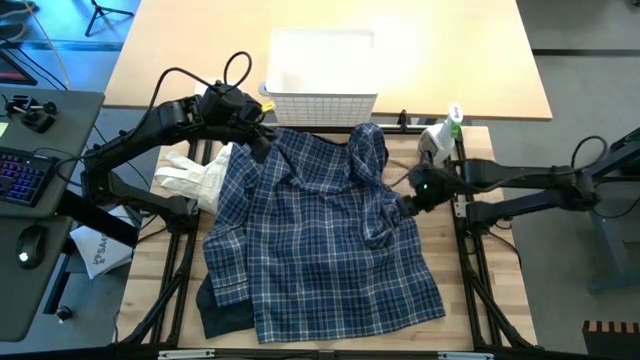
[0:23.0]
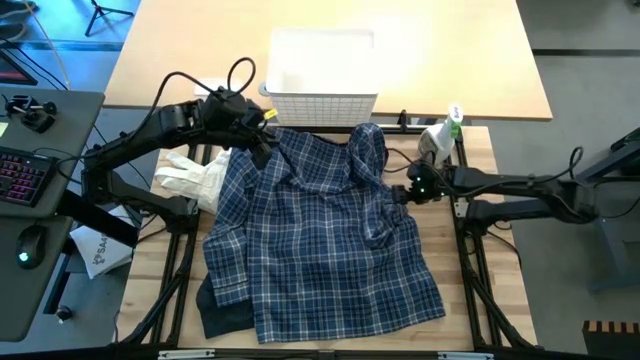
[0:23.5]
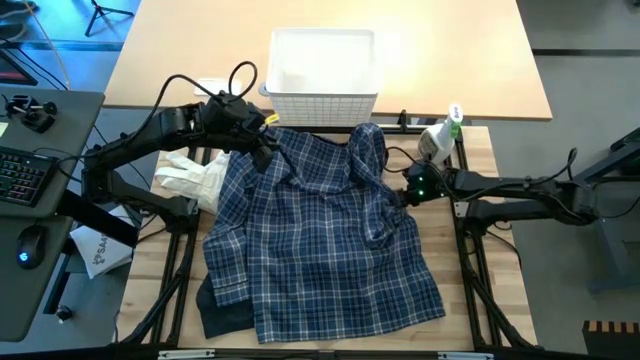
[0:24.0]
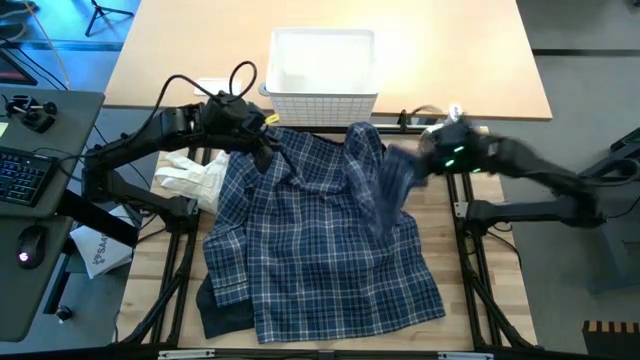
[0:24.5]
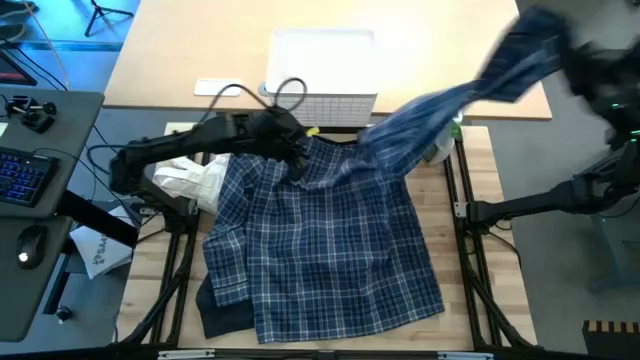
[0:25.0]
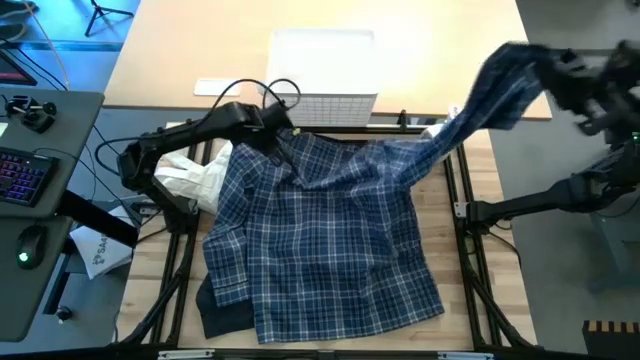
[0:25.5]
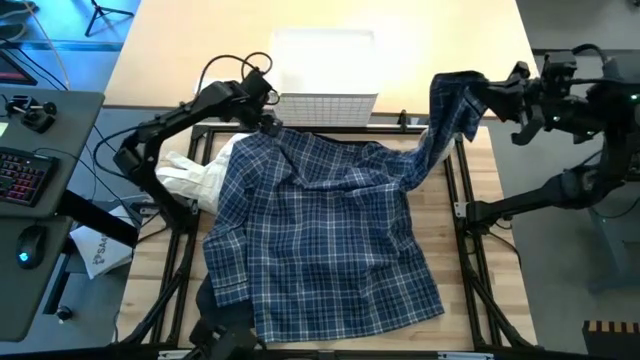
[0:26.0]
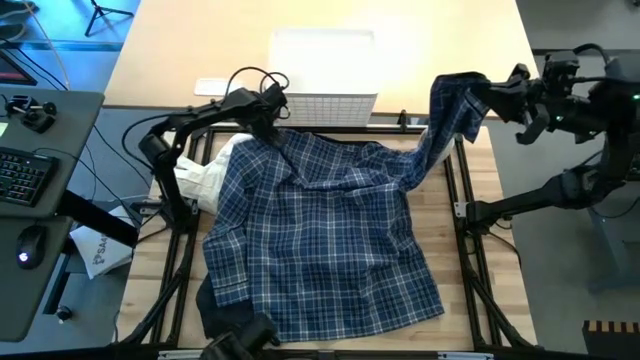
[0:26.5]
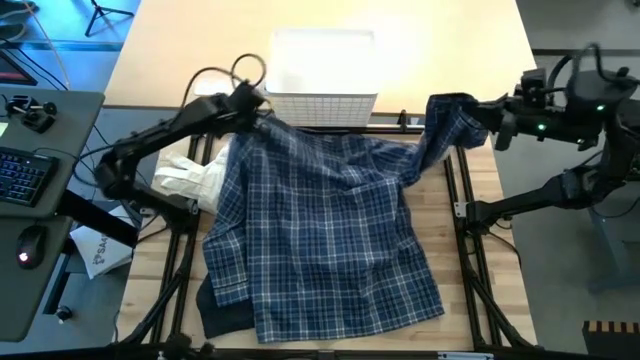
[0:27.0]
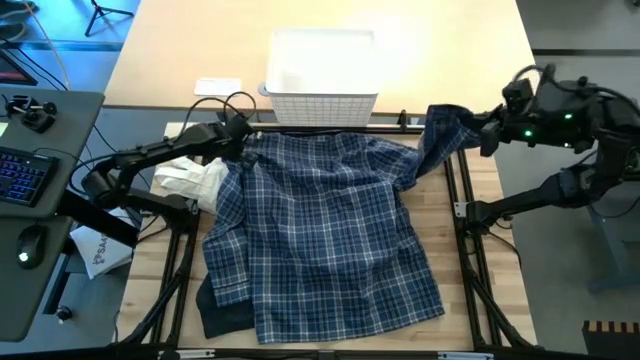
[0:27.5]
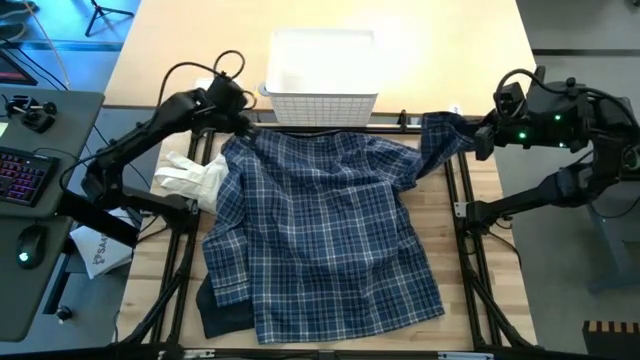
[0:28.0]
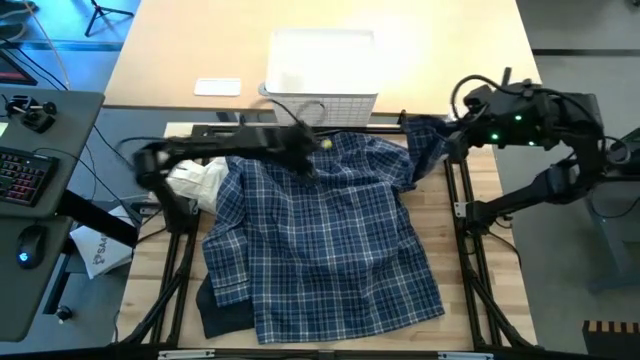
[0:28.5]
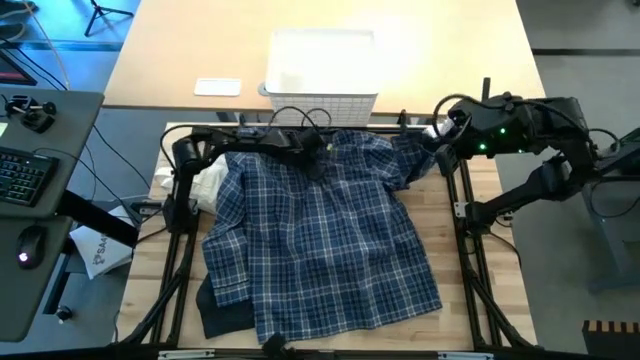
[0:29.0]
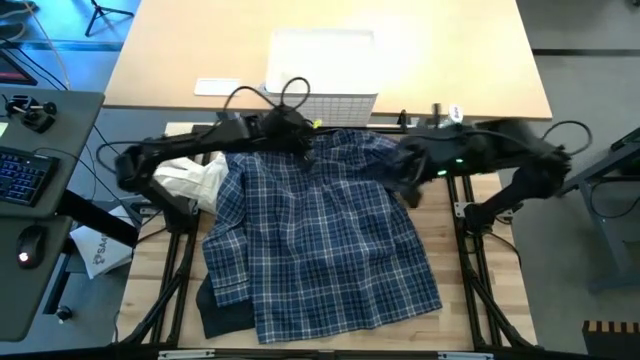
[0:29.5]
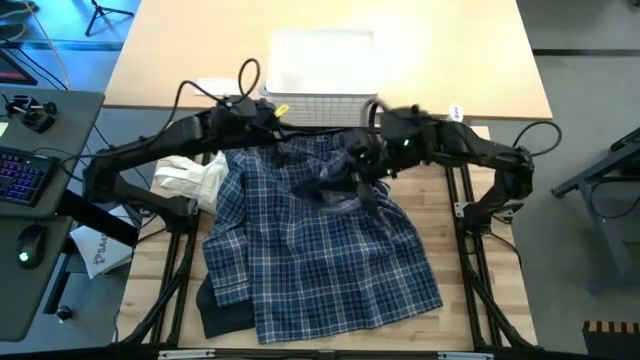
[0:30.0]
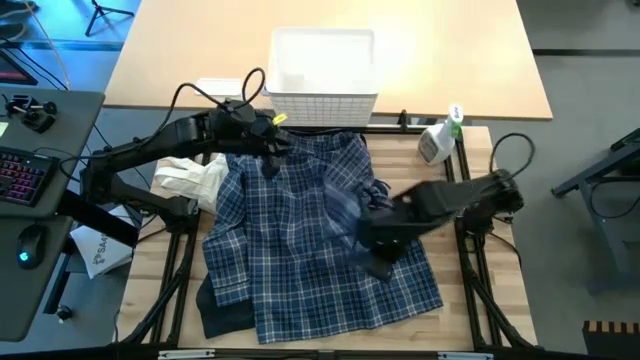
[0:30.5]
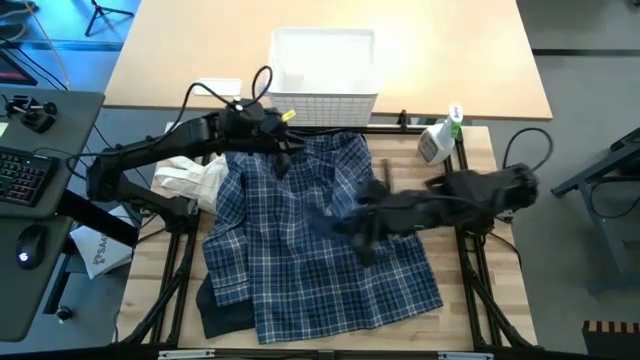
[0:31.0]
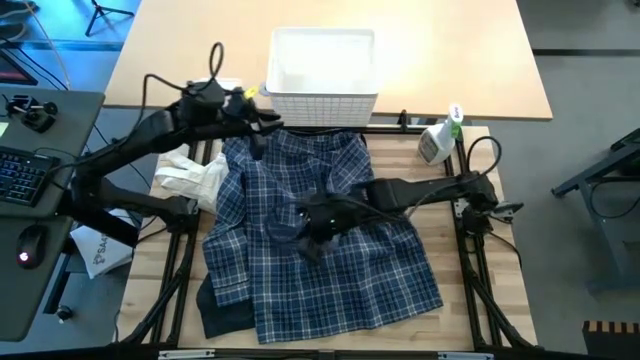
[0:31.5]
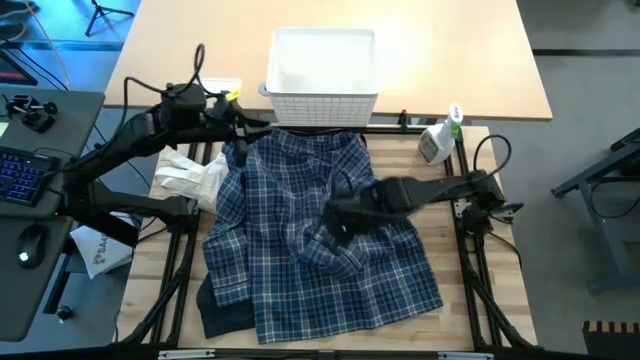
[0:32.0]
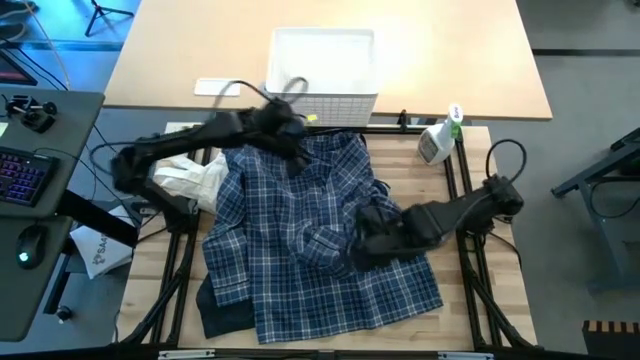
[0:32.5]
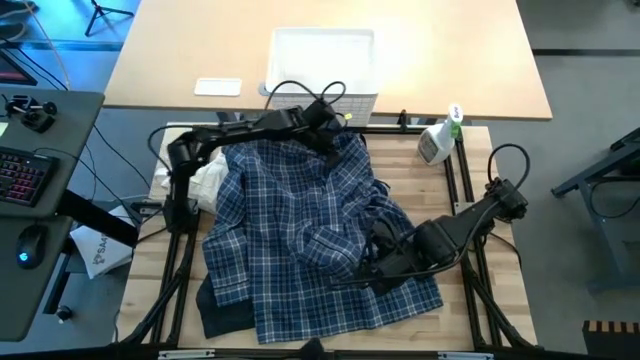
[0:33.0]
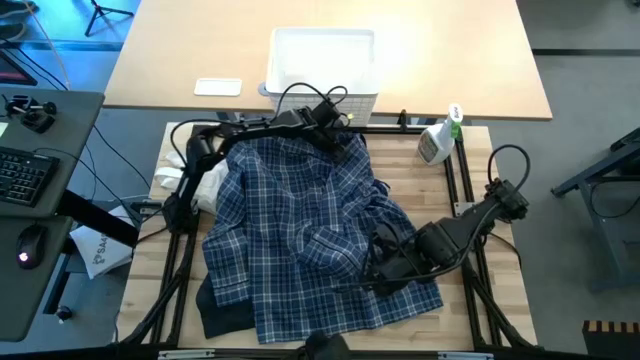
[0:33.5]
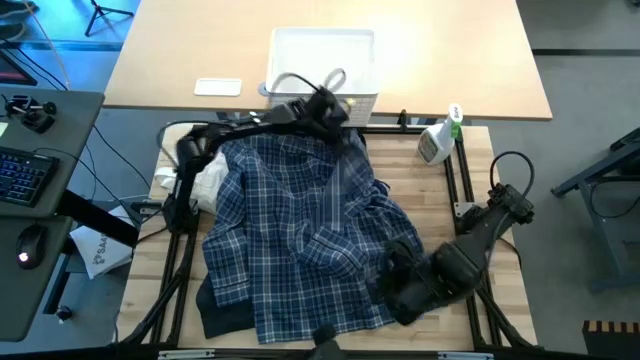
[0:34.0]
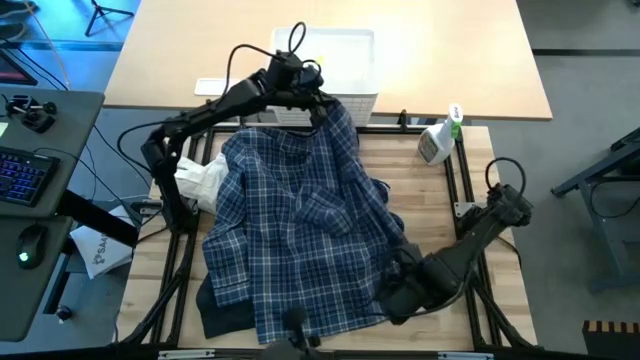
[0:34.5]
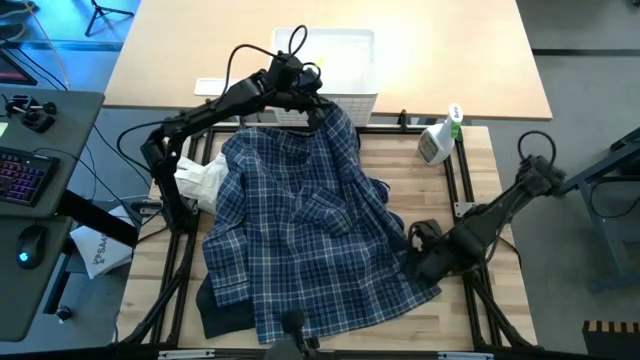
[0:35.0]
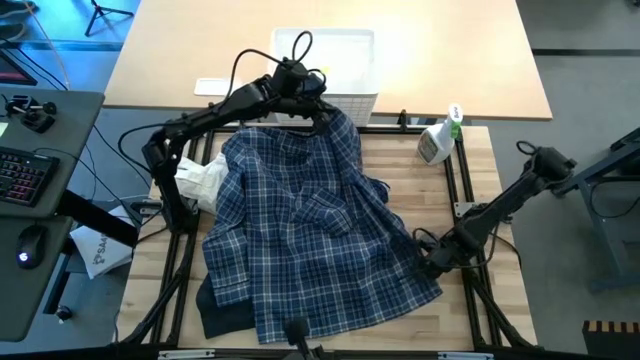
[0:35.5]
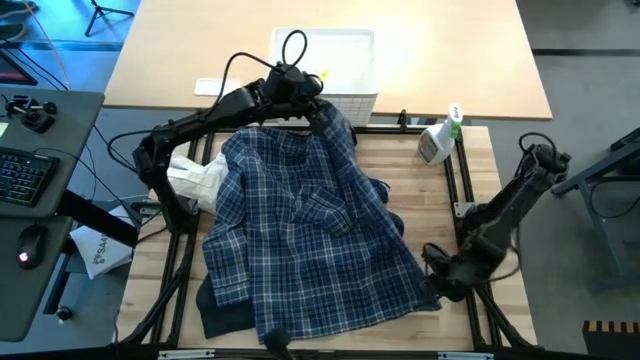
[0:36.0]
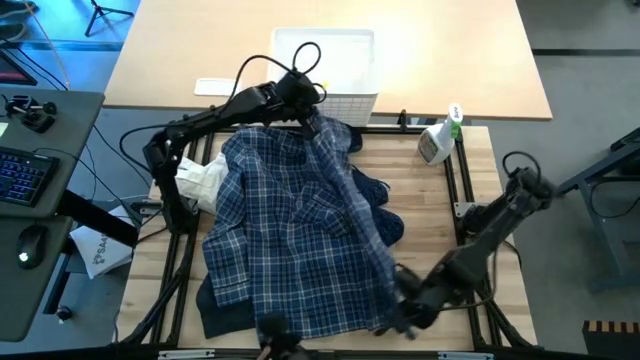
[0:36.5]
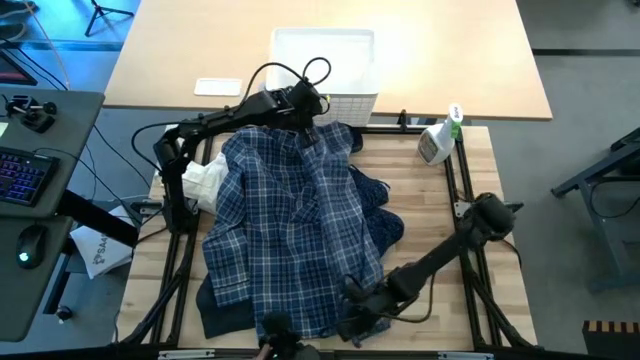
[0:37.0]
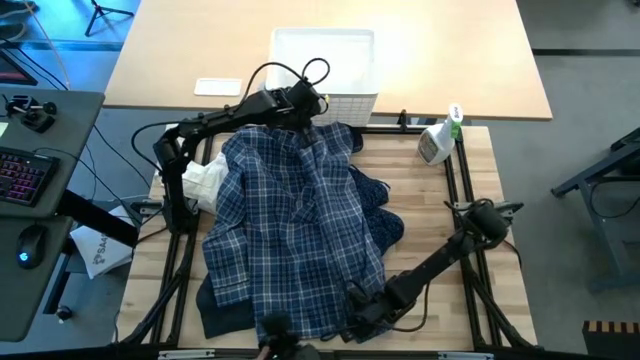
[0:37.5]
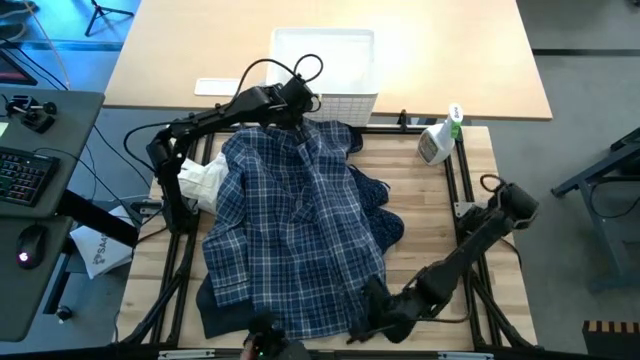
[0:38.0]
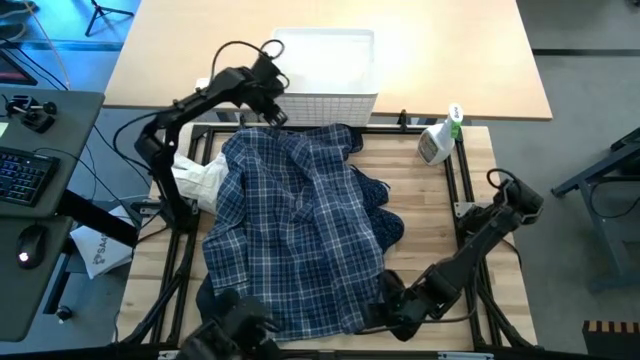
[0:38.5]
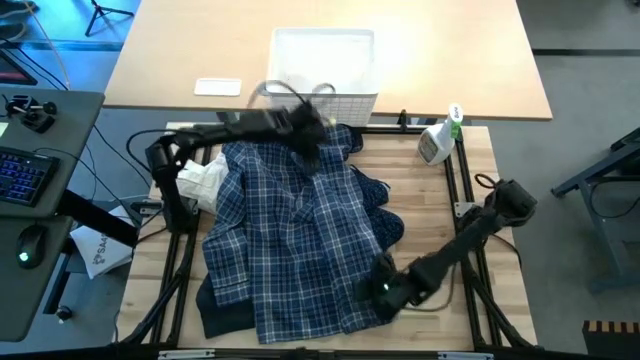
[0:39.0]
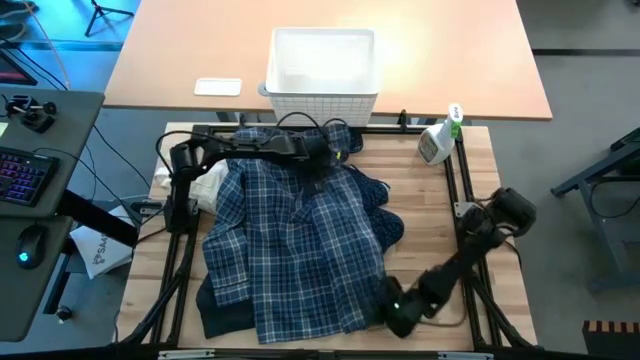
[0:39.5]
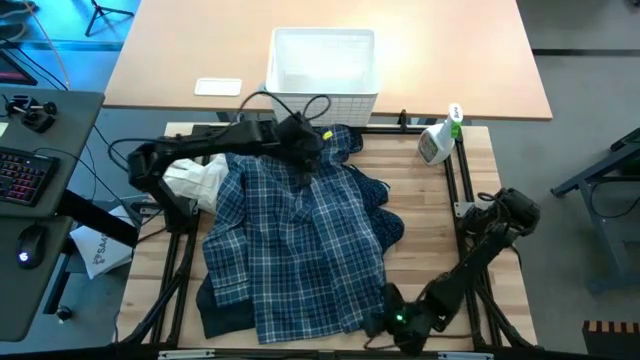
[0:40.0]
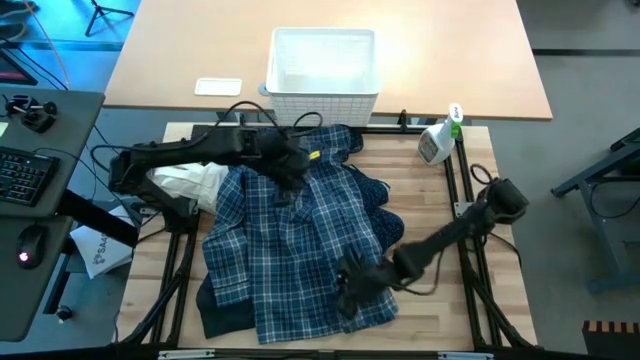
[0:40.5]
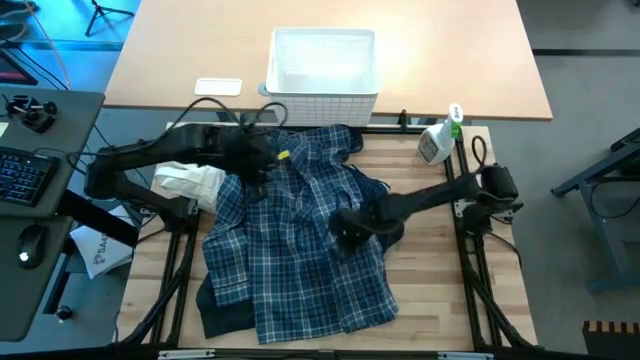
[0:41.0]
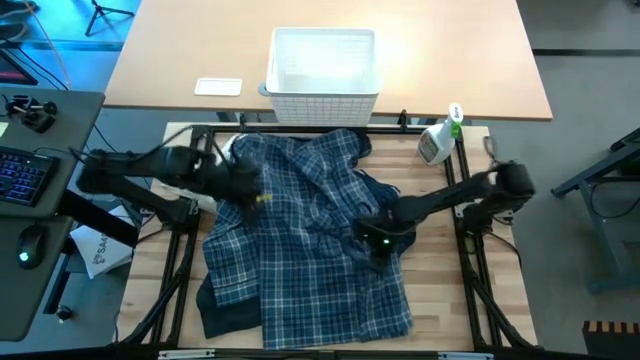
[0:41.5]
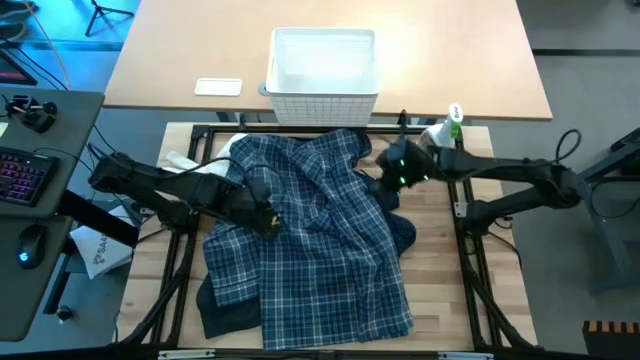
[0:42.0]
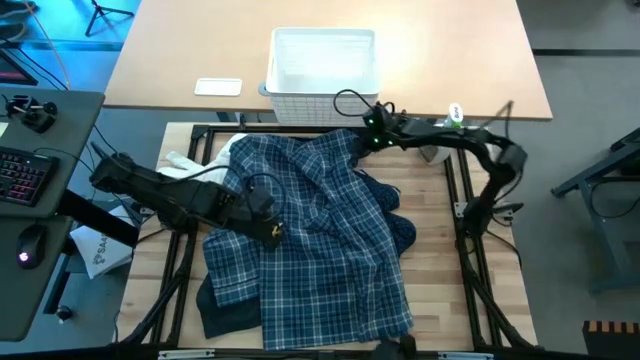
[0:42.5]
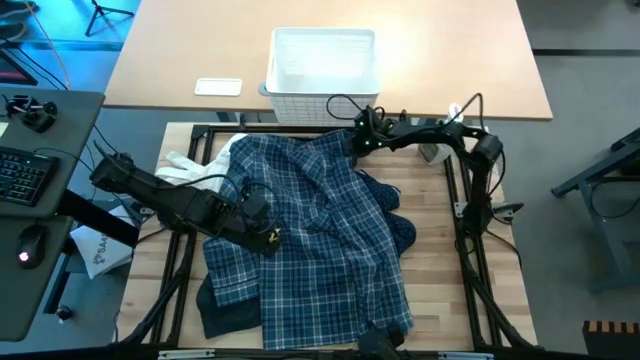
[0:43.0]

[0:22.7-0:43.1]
Task: Fold laundry
Fold the blue plaid flannel shirt
